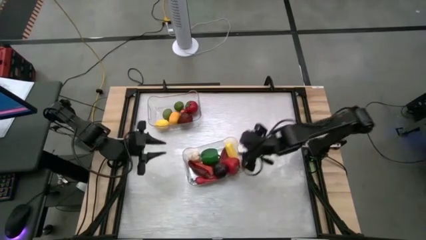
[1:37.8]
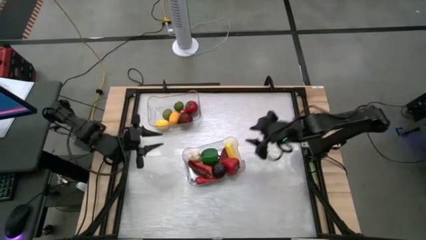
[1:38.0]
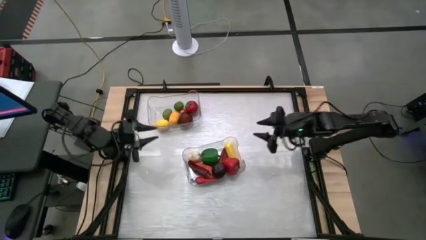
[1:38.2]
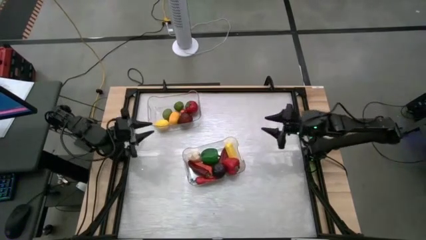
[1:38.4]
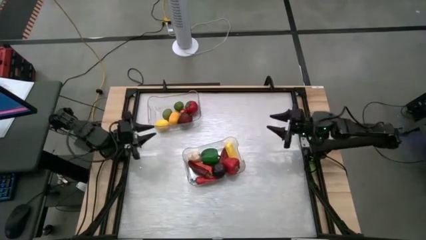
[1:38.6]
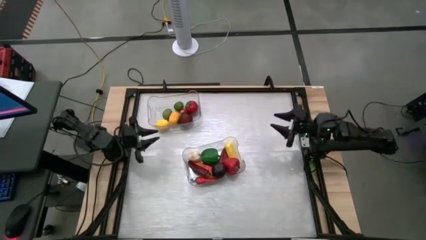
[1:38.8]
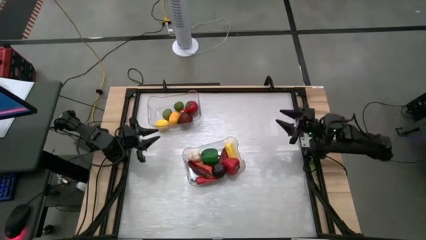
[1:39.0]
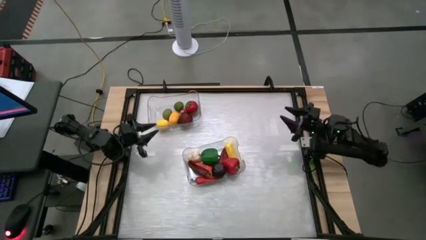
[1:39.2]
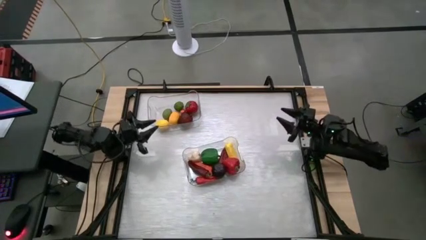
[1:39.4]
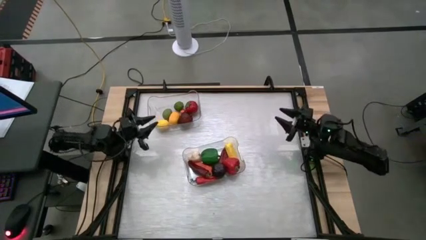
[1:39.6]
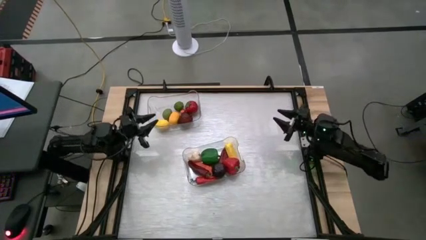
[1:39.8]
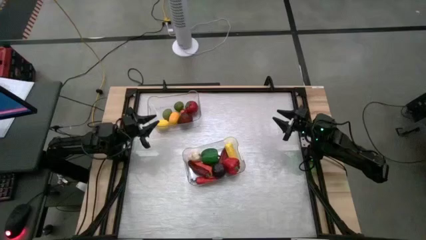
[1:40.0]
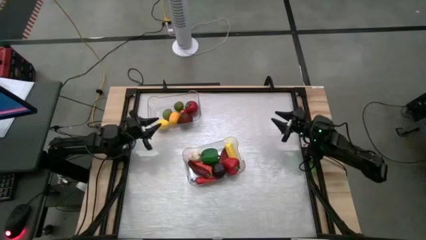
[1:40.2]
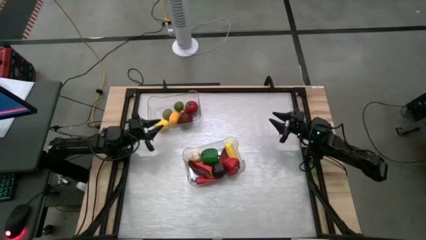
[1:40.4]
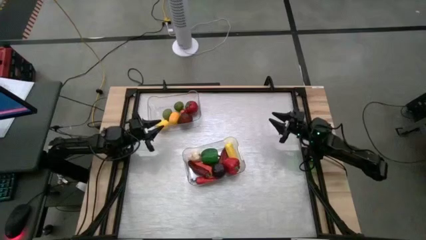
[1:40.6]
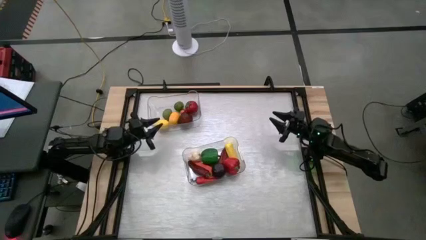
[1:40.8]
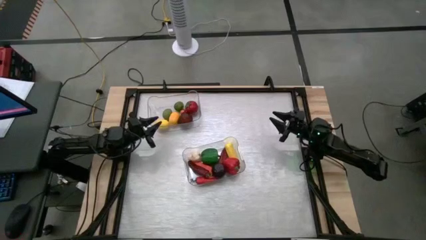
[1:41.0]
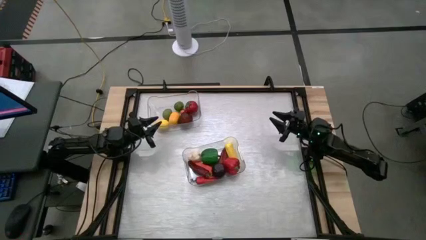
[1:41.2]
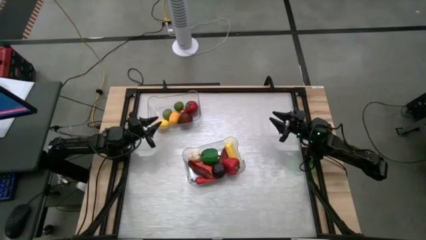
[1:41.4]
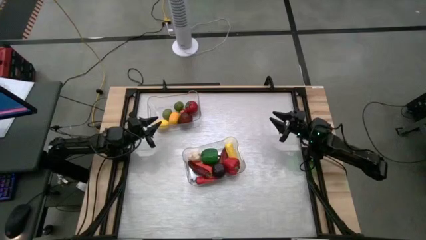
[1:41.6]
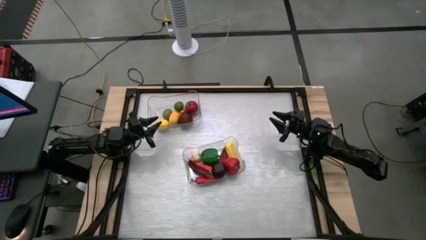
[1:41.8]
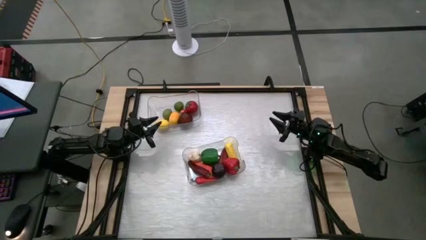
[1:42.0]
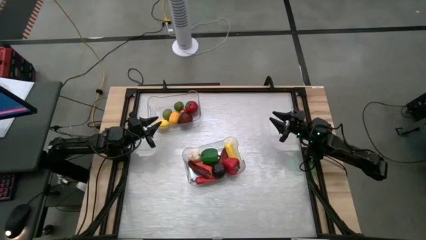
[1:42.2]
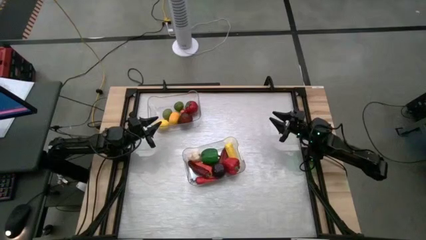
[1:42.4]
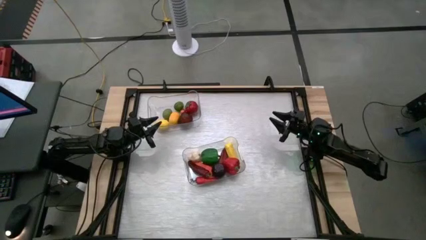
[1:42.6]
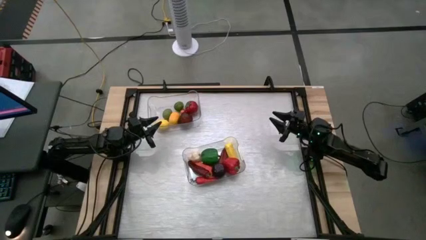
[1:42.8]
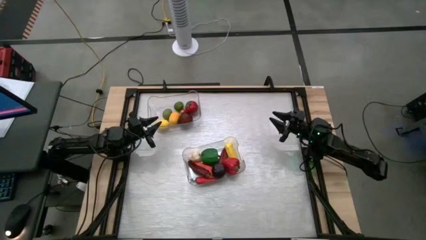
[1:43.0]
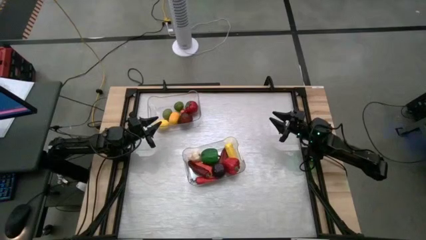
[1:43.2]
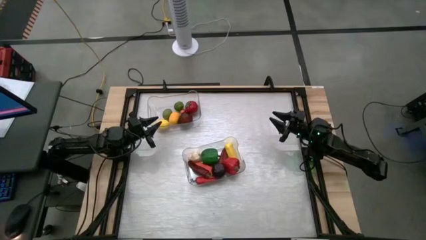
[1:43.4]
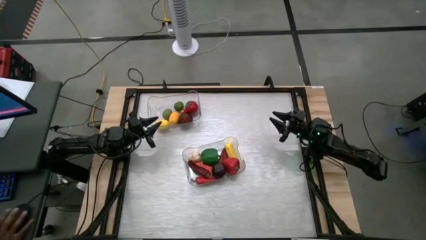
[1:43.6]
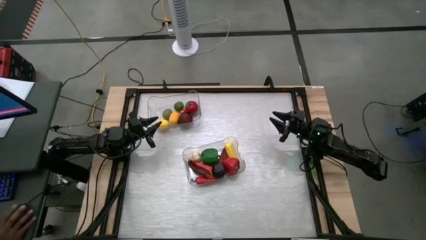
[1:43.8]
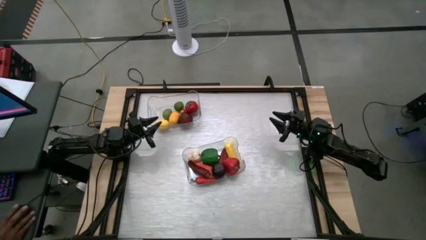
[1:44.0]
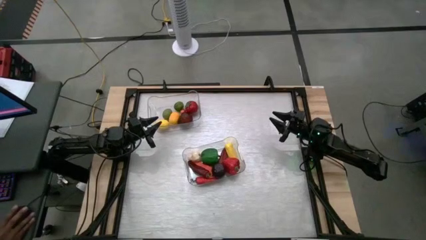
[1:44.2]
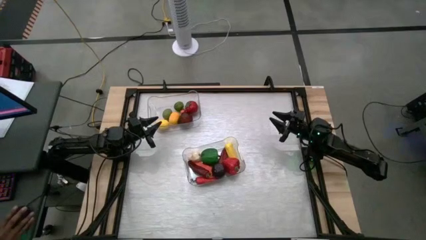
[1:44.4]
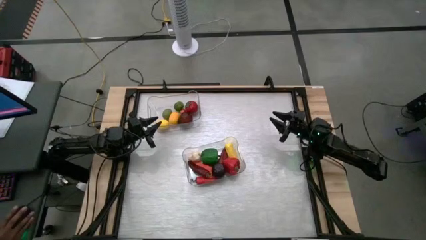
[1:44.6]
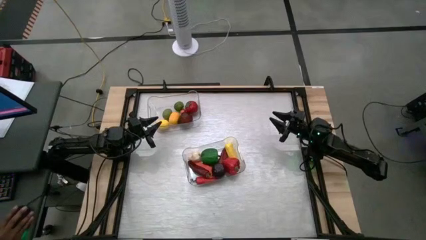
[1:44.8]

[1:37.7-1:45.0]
Task: Sort produce into baskets
Return to Home Position

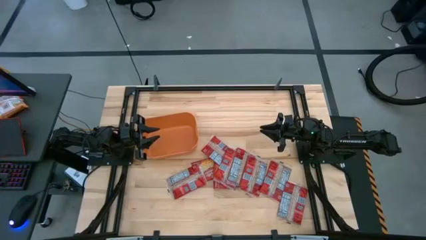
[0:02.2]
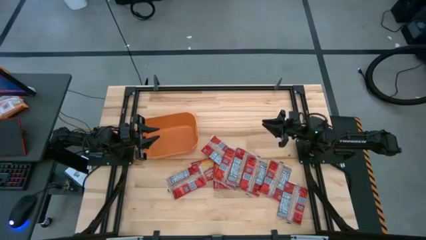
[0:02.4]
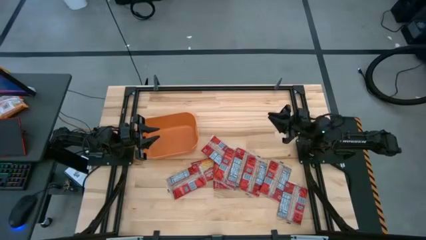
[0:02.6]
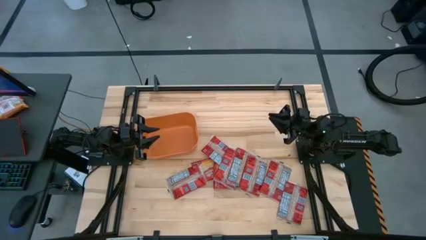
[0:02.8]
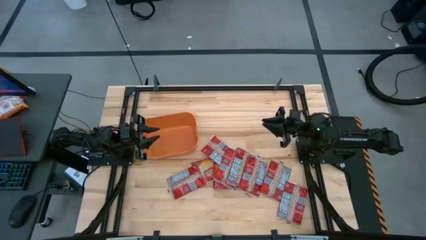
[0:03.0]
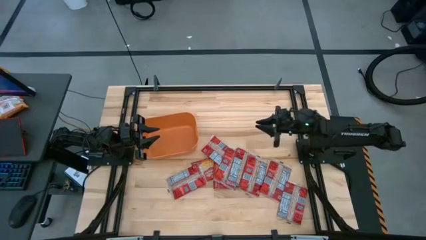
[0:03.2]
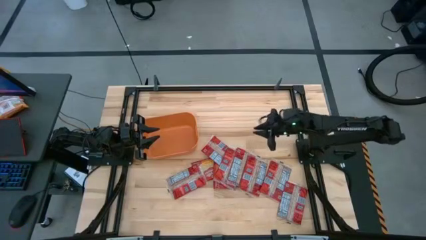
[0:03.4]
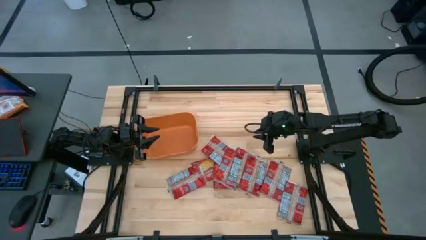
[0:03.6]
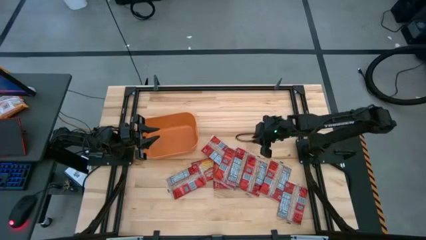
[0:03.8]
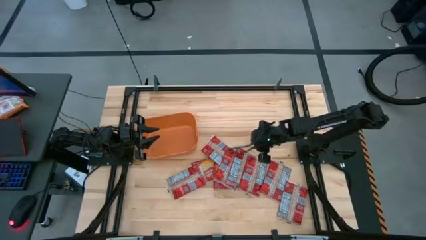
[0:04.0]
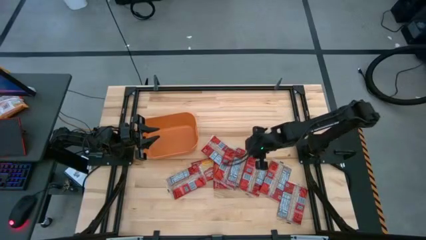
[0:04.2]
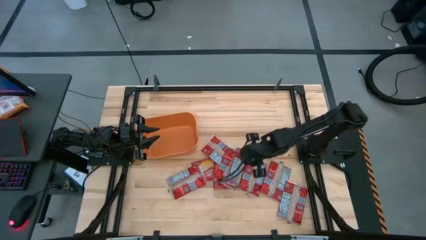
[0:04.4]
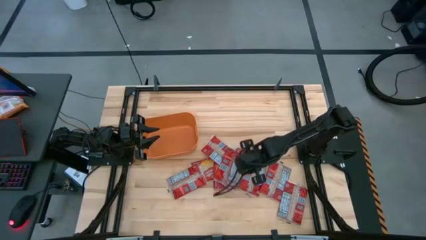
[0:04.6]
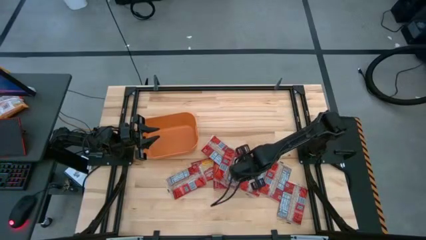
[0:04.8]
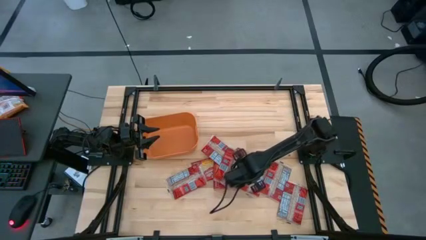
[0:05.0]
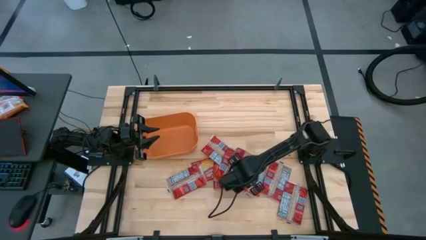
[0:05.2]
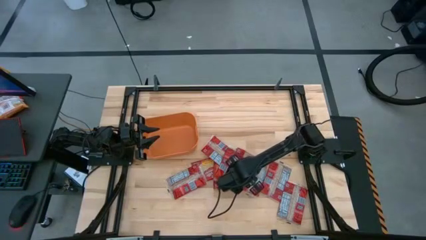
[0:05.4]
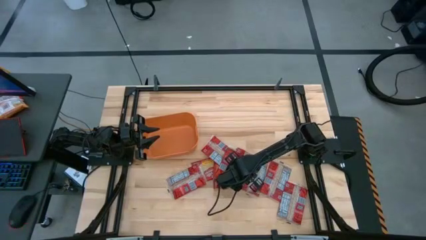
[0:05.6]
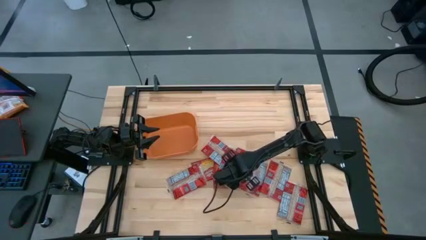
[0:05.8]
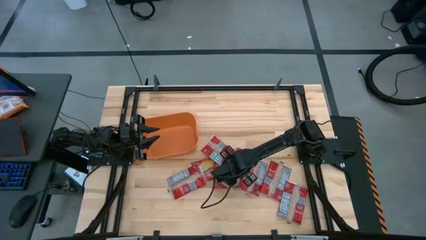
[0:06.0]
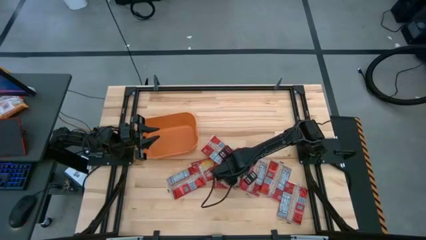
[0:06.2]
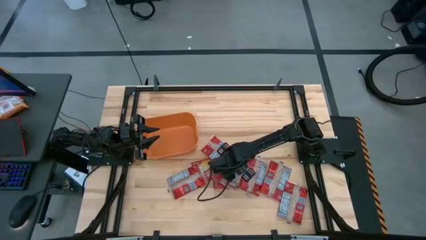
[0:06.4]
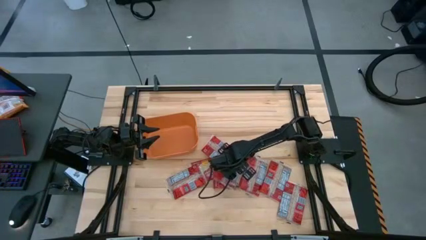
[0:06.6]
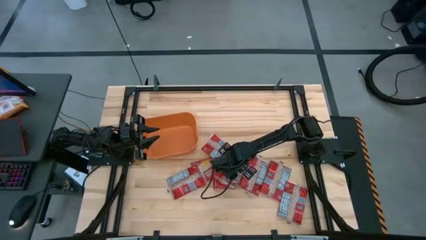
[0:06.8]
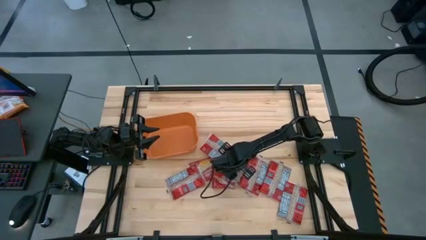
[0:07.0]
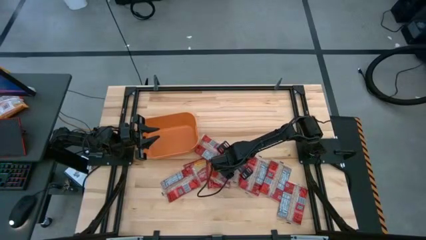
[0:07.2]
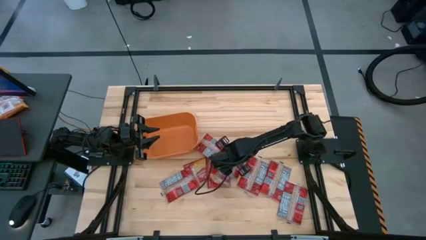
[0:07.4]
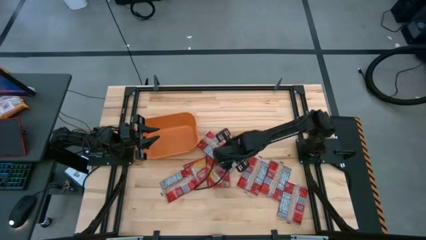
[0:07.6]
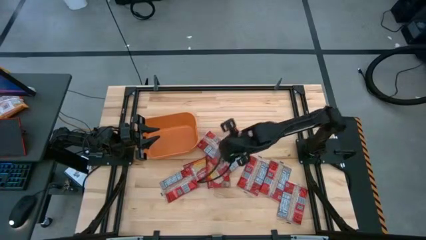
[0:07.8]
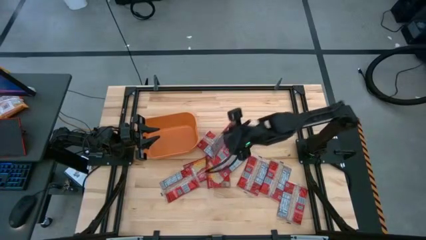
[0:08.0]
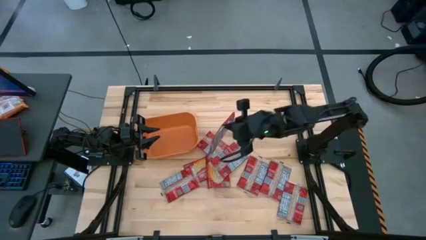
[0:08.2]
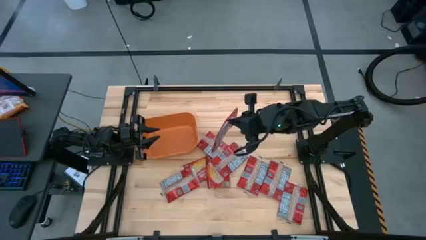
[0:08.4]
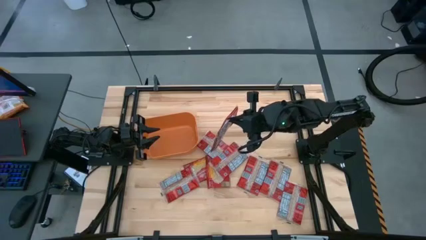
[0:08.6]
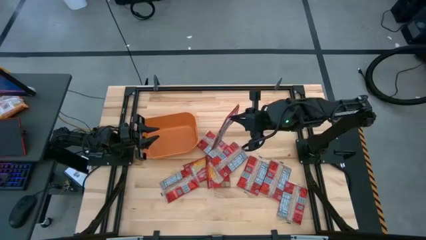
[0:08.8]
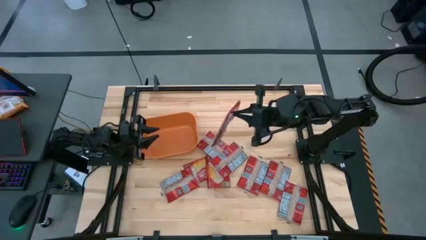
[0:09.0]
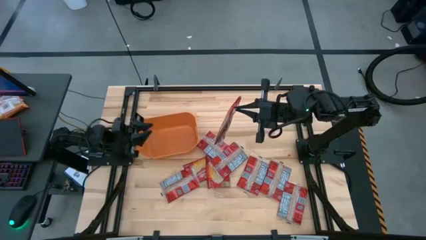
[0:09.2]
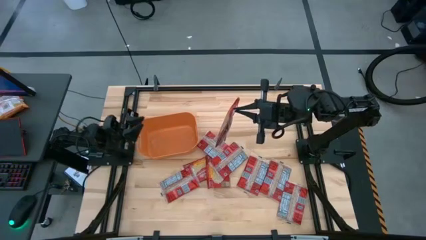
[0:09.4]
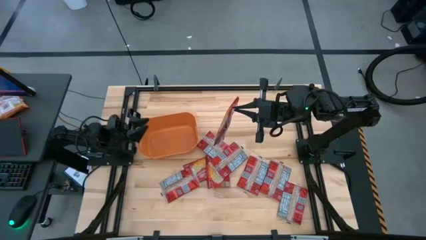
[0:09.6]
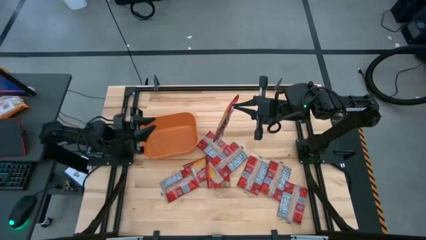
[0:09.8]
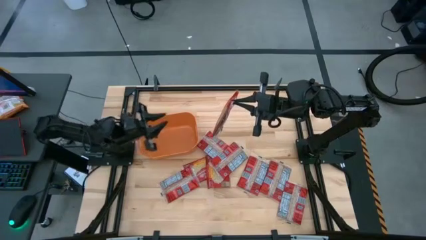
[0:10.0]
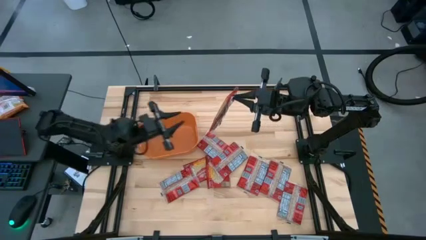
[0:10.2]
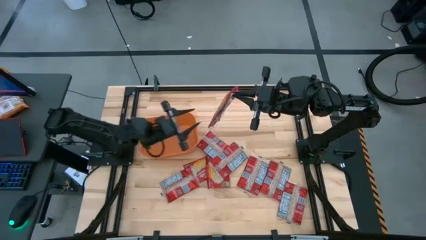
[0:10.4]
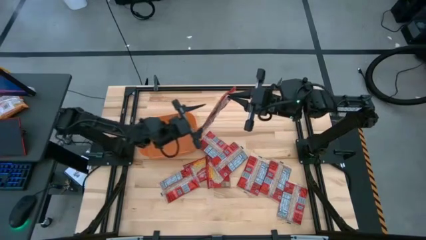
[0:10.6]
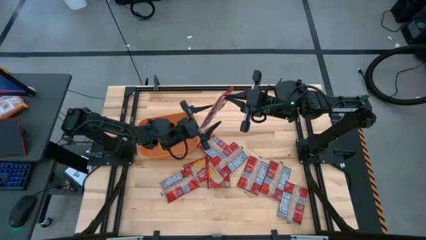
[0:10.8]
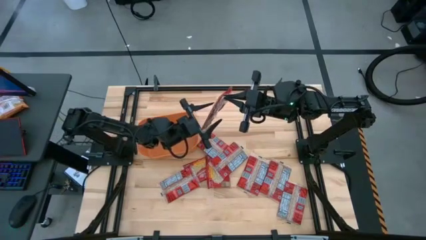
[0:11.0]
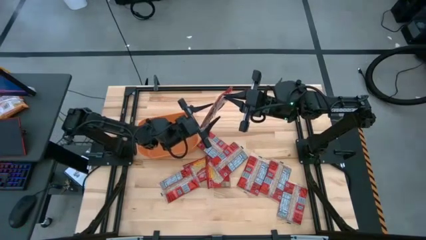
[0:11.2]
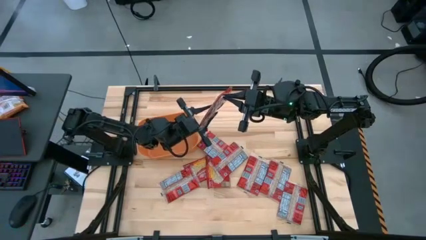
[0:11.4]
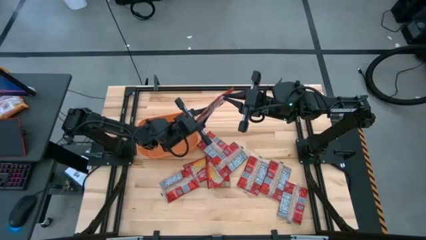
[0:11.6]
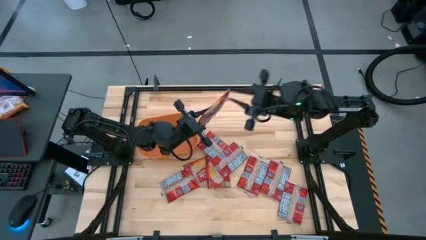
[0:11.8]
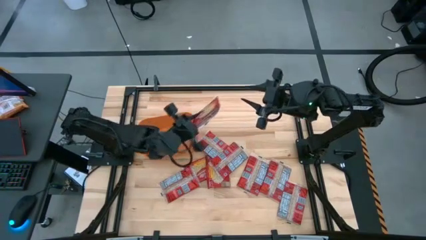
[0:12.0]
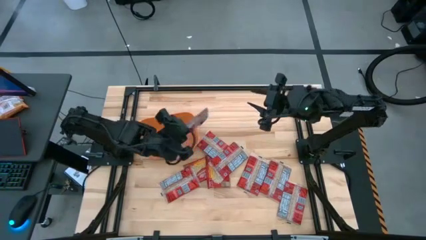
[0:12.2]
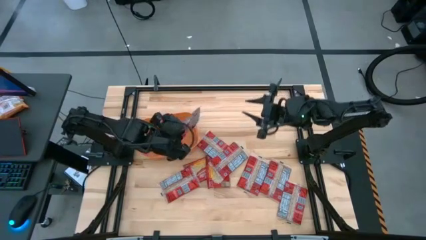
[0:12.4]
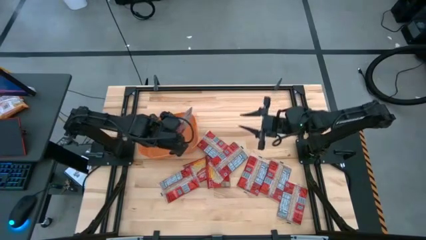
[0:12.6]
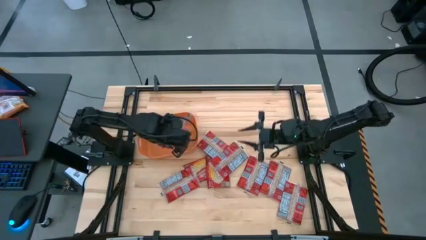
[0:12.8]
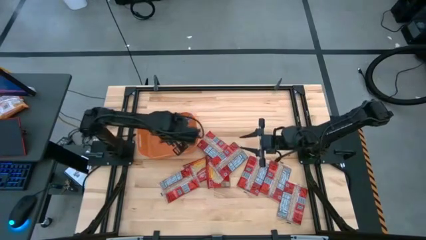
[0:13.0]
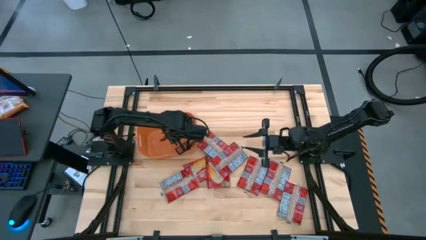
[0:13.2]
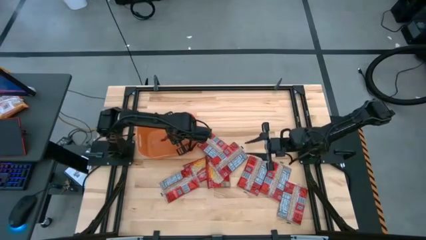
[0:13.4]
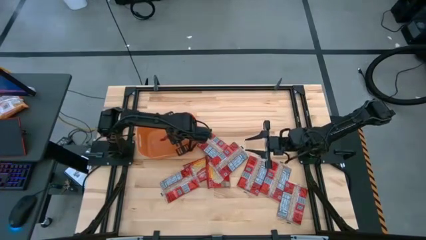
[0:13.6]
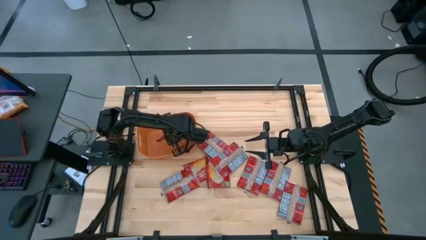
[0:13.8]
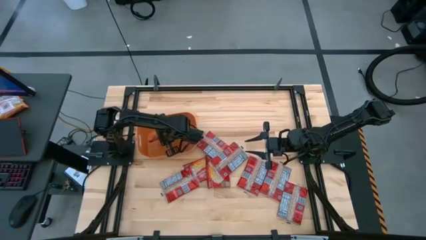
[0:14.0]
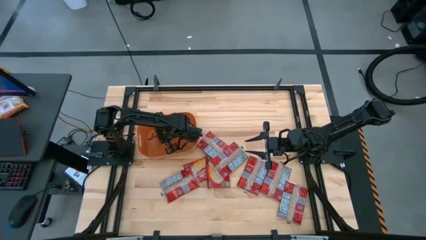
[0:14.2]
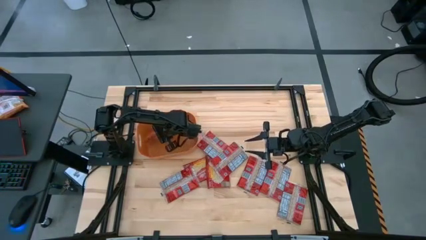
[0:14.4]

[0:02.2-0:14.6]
Task: Sort popcorn bags into baskets
Put the red popcorn bag into the orange bin
